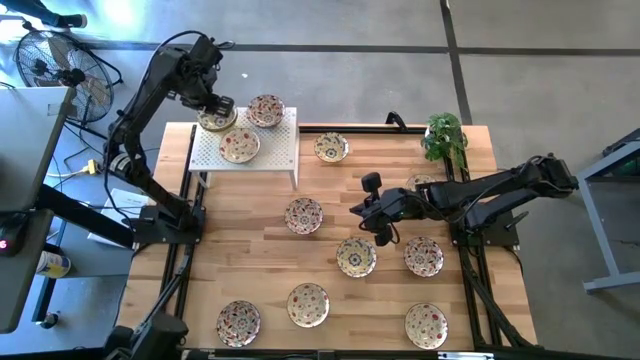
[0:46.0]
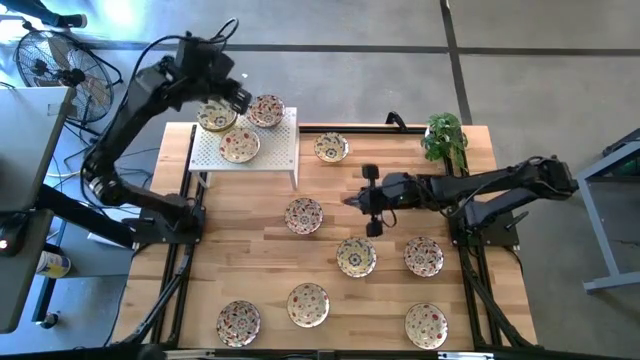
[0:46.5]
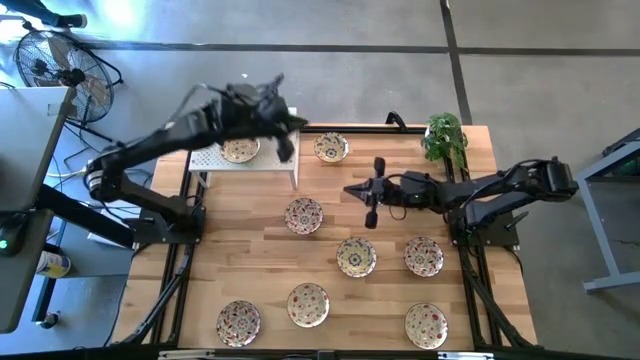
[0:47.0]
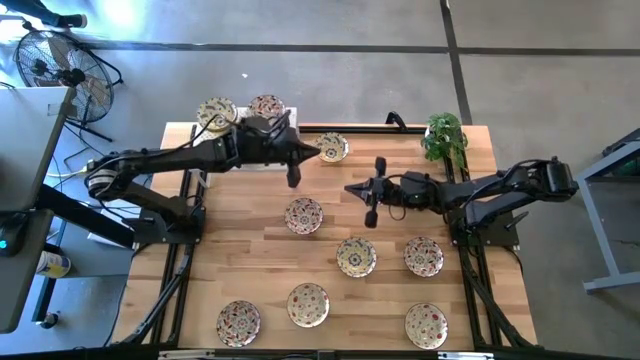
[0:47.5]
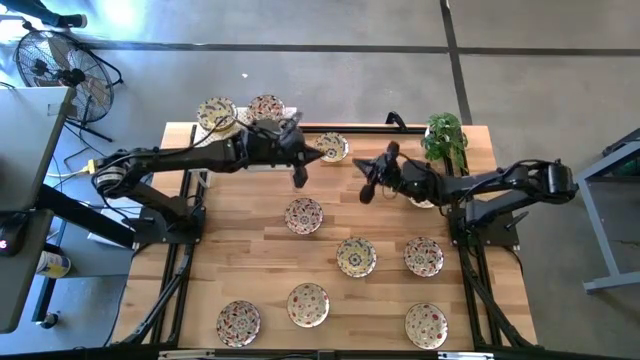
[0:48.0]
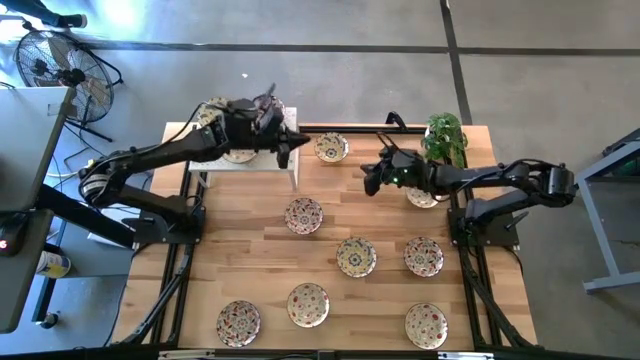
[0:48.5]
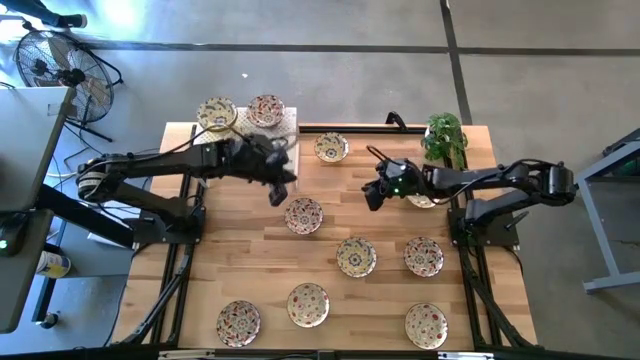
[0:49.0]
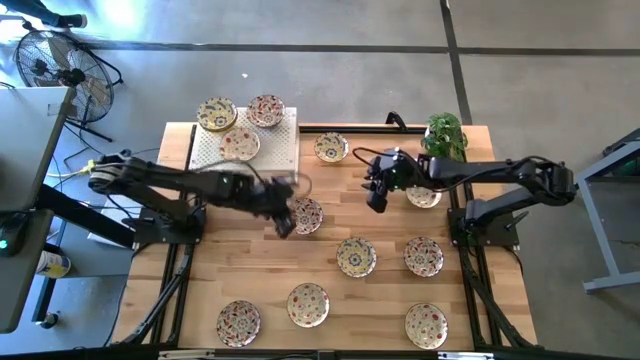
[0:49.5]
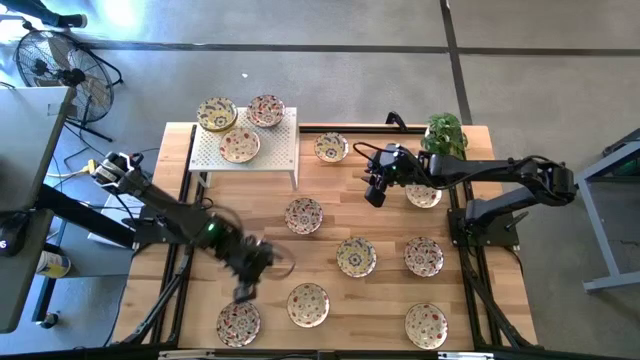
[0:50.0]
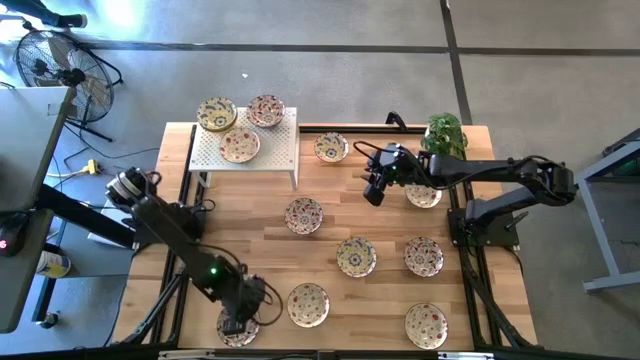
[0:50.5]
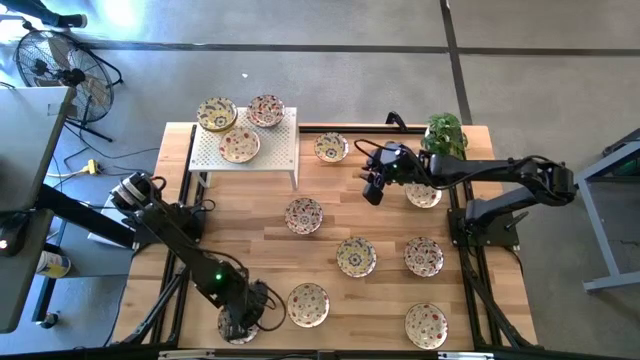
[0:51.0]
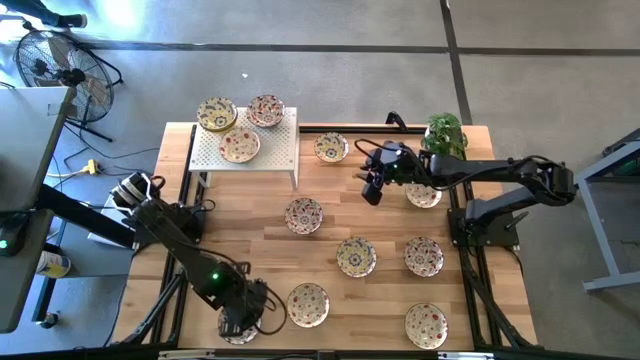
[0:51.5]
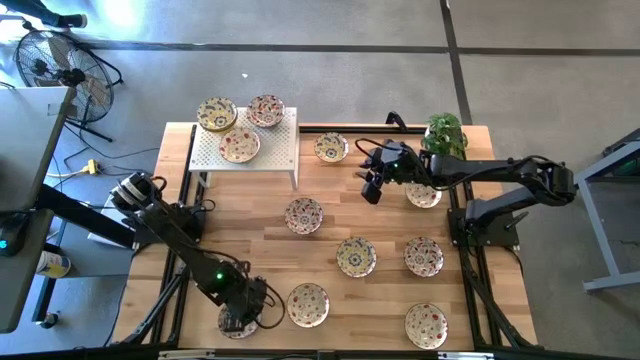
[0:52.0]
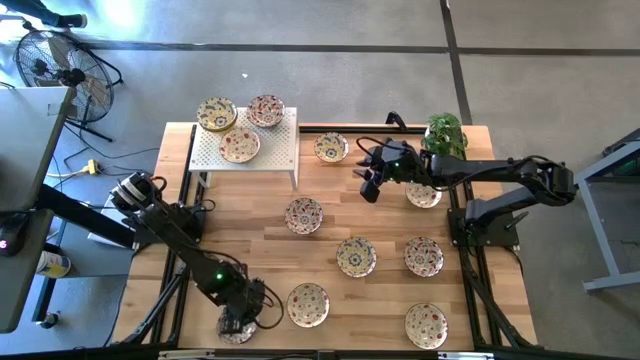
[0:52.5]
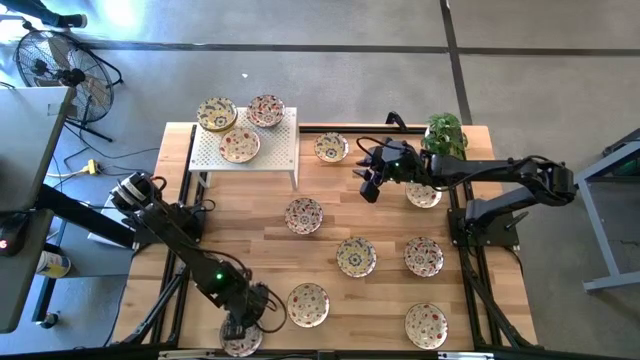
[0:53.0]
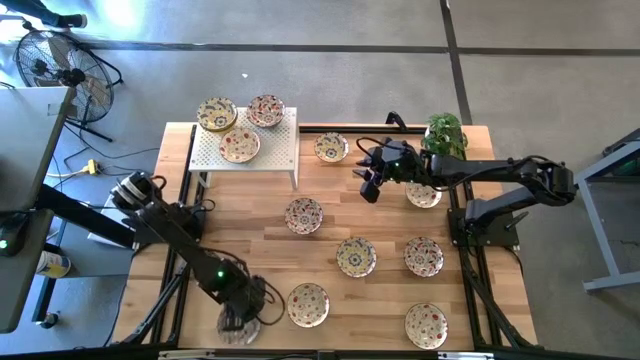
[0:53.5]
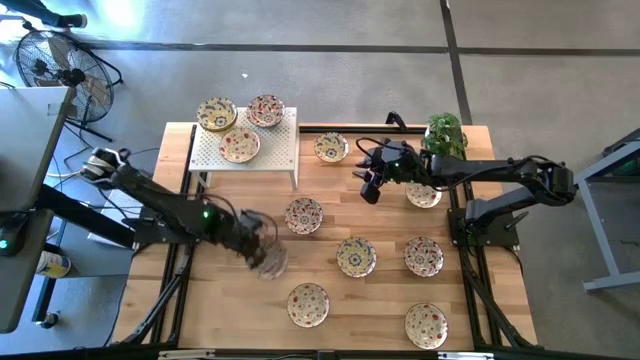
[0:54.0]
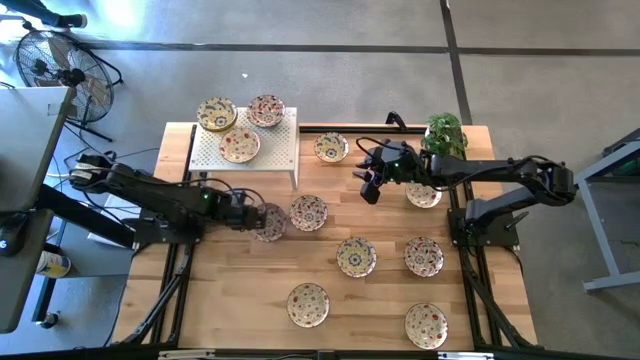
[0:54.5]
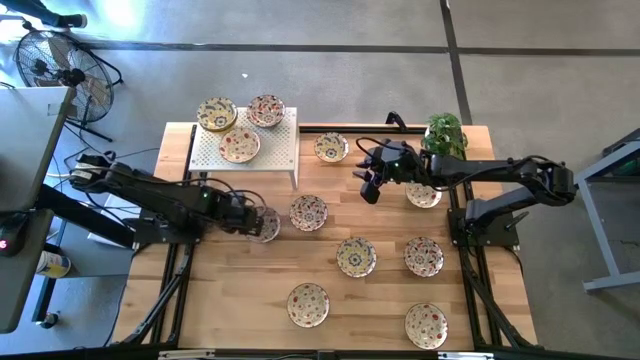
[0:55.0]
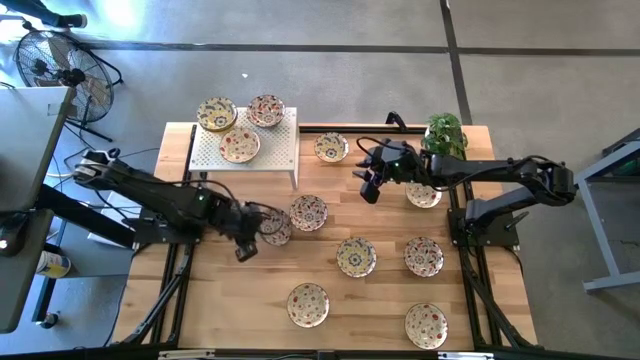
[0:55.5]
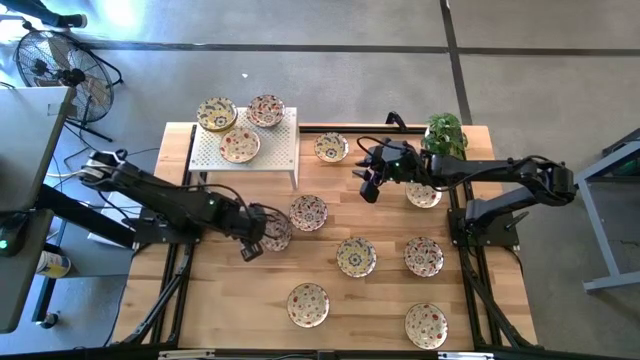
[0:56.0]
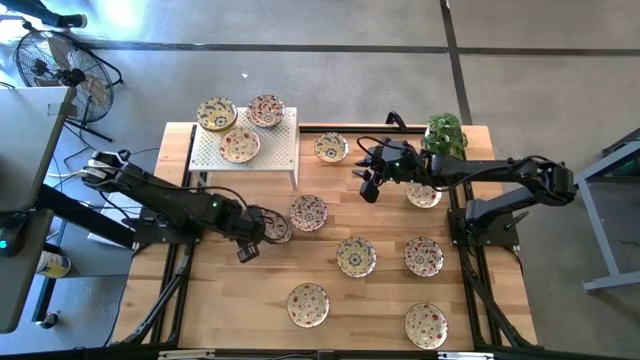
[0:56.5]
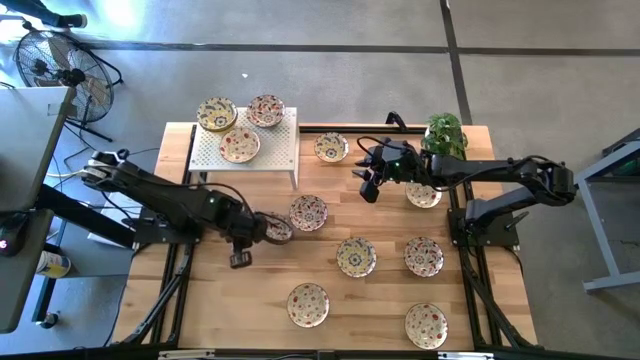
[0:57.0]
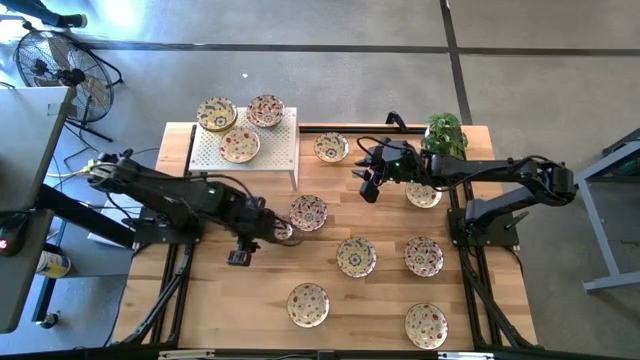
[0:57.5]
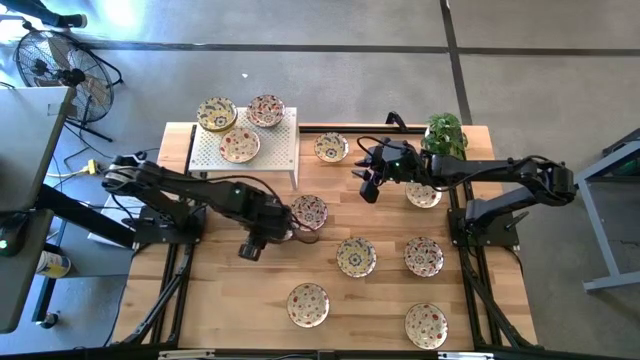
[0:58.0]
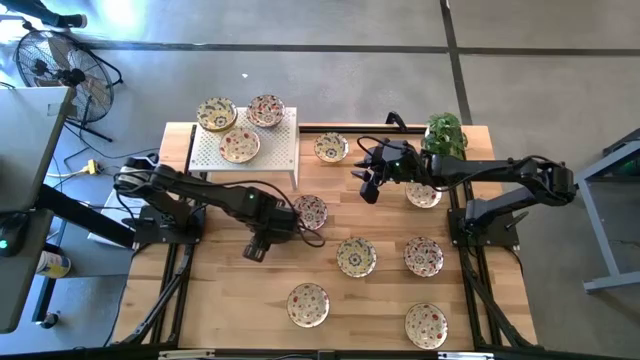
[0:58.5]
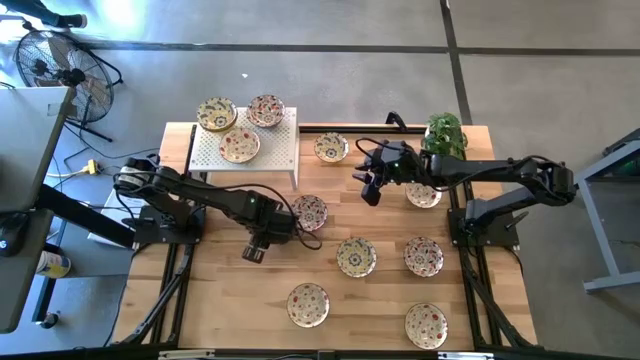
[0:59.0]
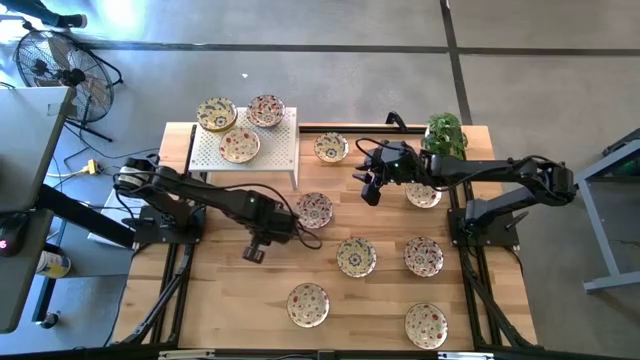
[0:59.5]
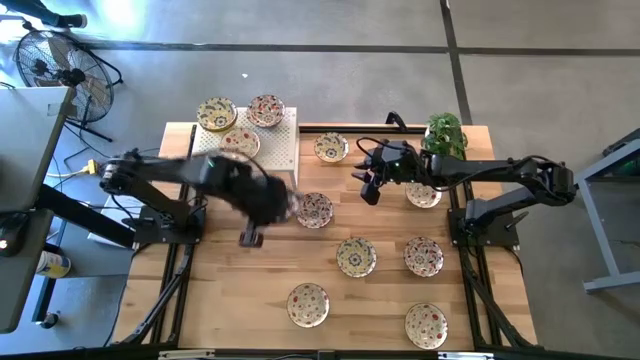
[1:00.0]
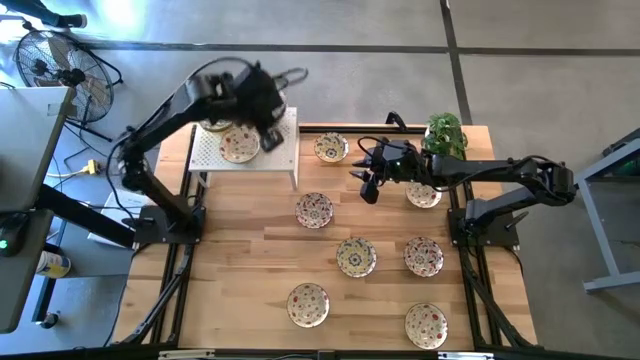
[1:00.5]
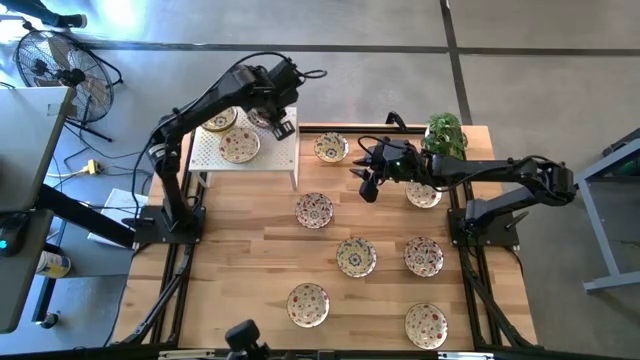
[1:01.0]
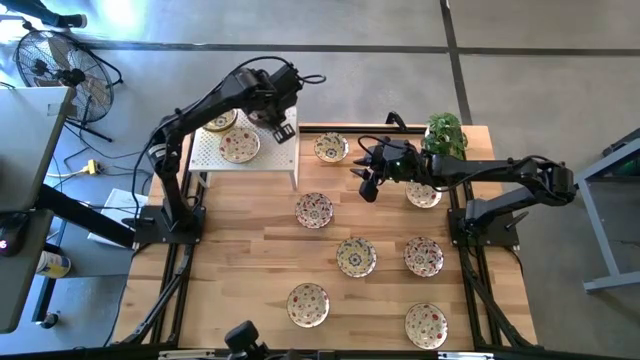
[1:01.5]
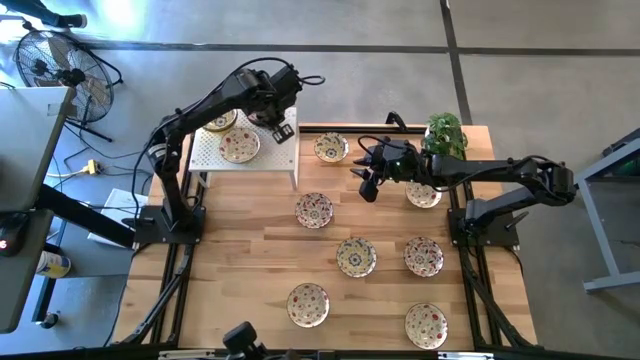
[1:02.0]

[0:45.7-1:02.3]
Task: Pick & Place Mini bowls
Stack the blue patterned bowl on top of the blue patterned bowl on the shelf

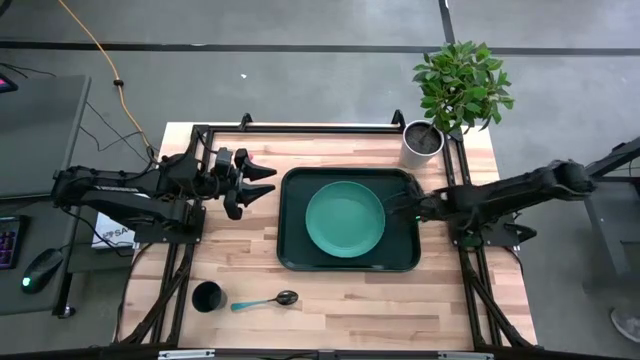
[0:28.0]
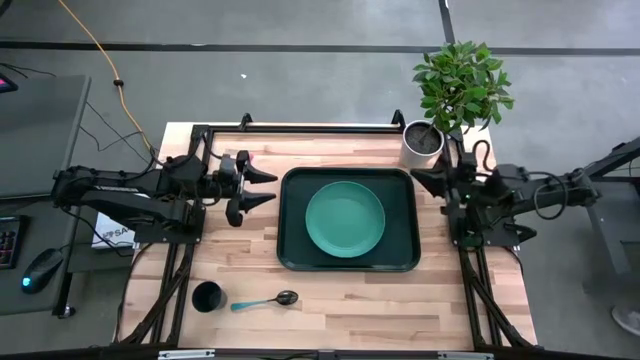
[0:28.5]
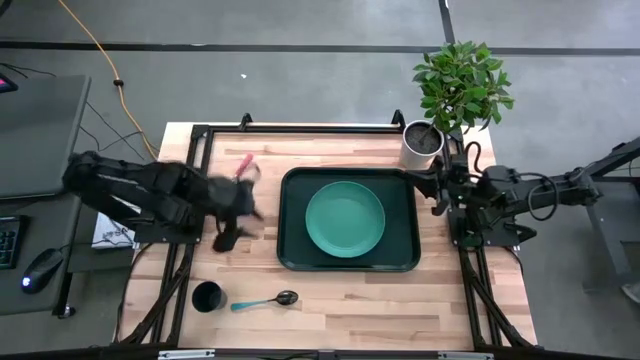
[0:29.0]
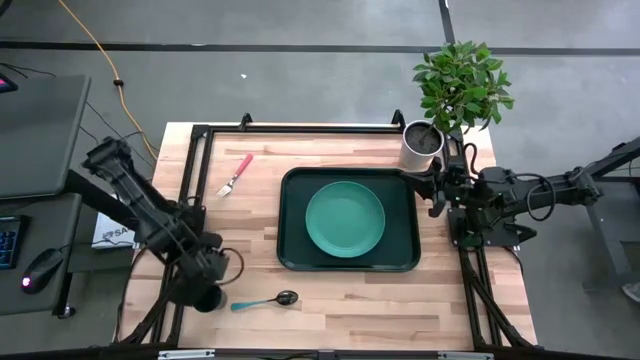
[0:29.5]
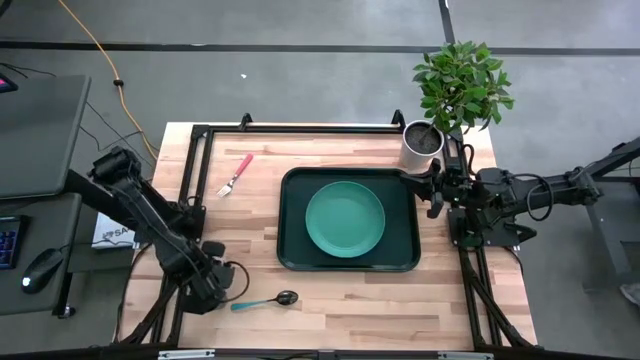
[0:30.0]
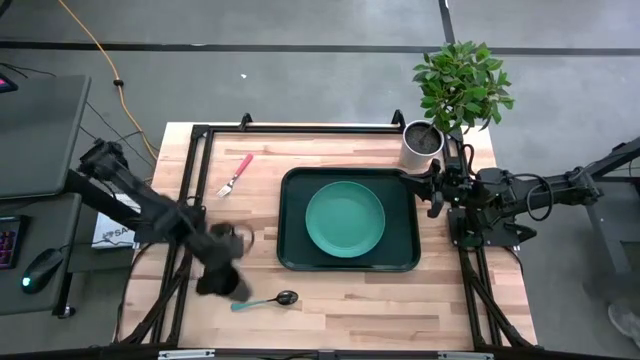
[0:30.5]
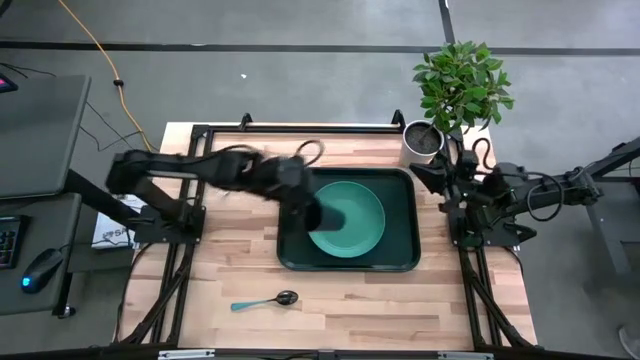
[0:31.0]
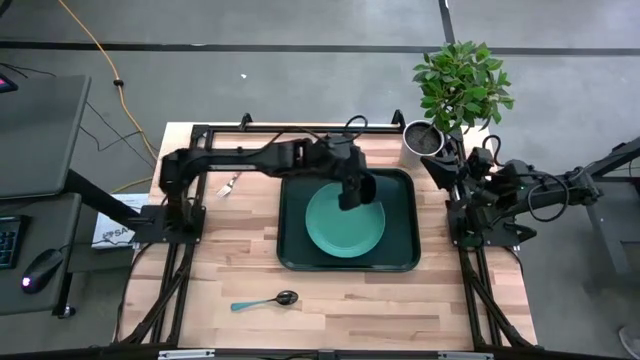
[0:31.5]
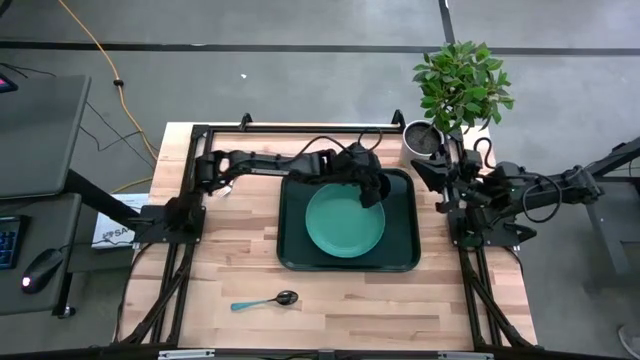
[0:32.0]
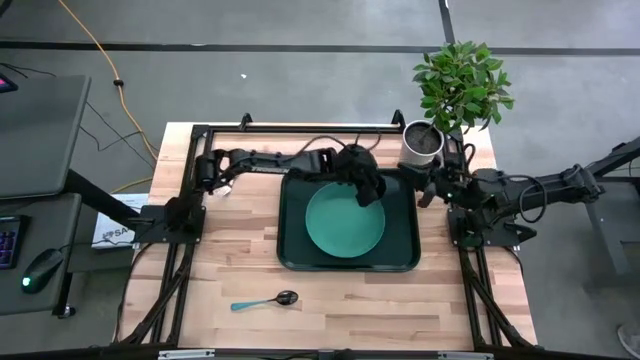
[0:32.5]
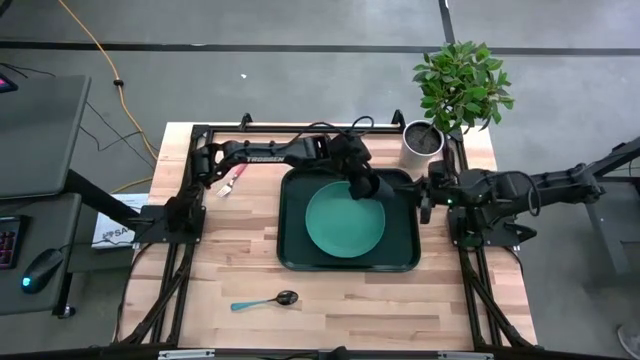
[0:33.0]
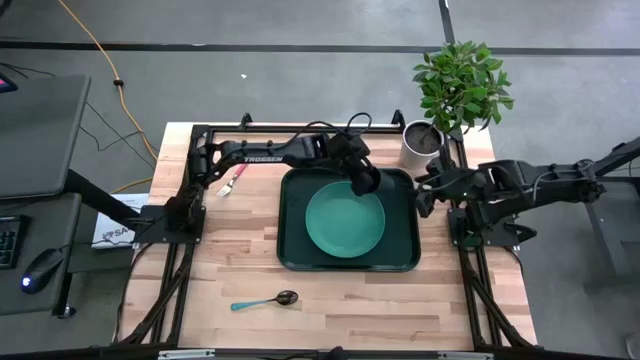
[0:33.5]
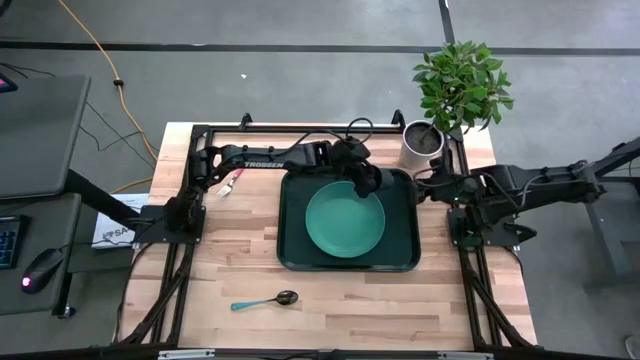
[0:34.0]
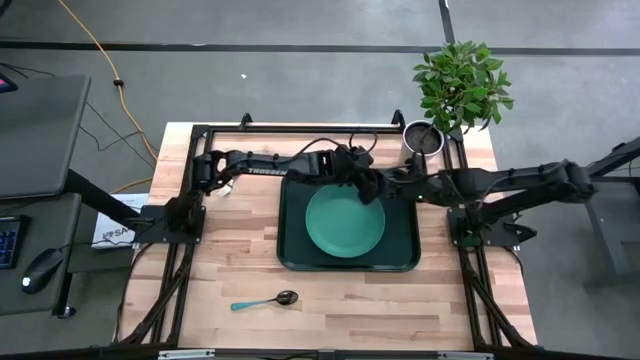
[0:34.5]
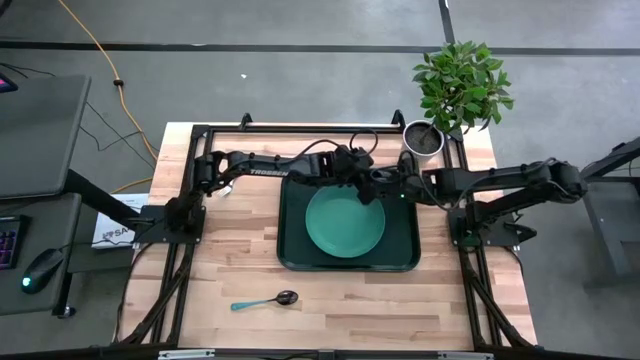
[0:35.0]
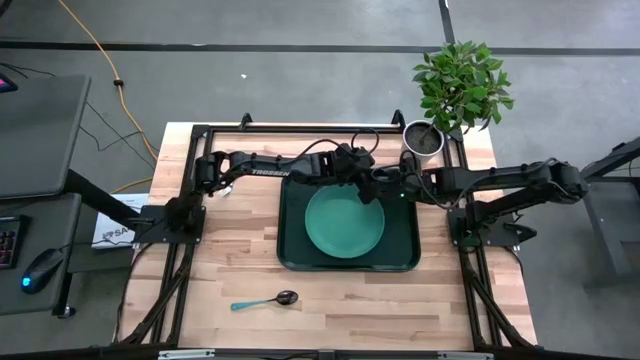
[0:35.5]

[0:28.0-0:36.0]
Task: Pick and place plate/cup/fork/spoon on tray
Put the blue cup on the green serving tray
